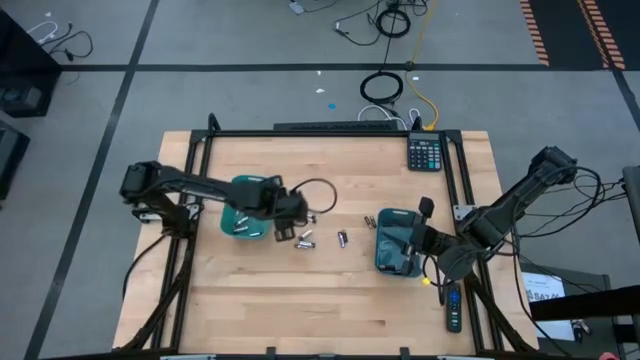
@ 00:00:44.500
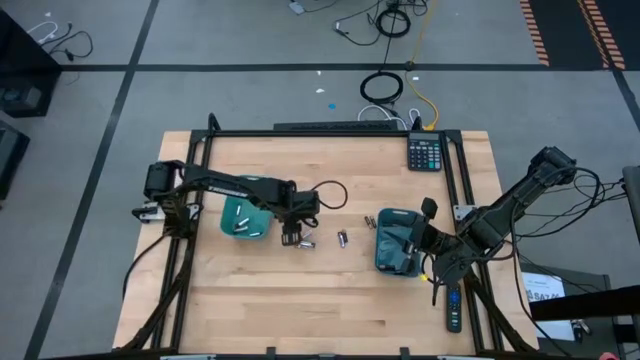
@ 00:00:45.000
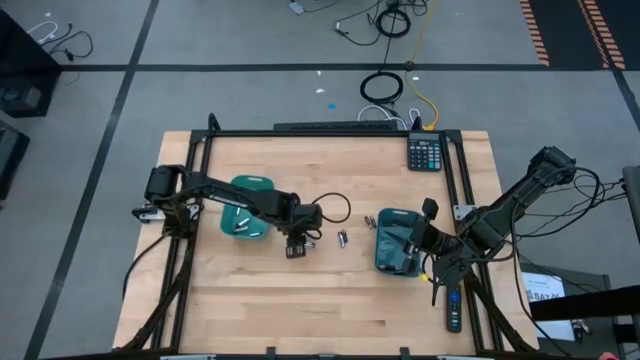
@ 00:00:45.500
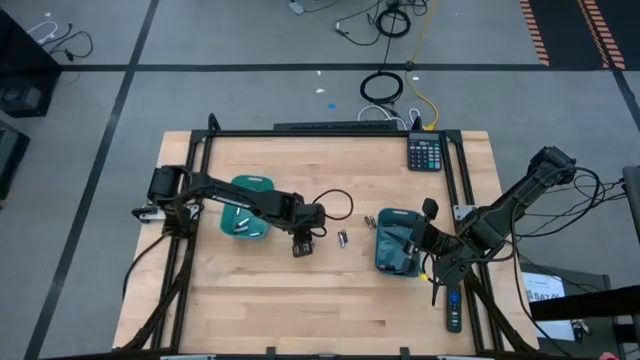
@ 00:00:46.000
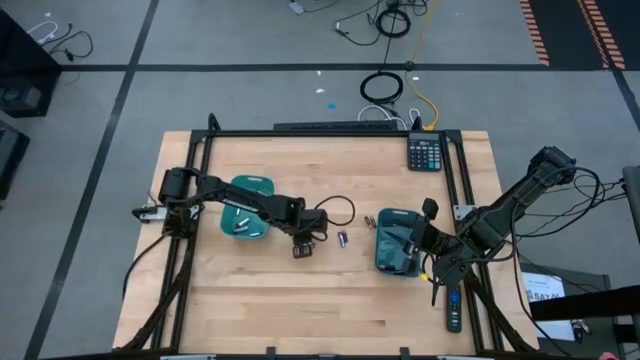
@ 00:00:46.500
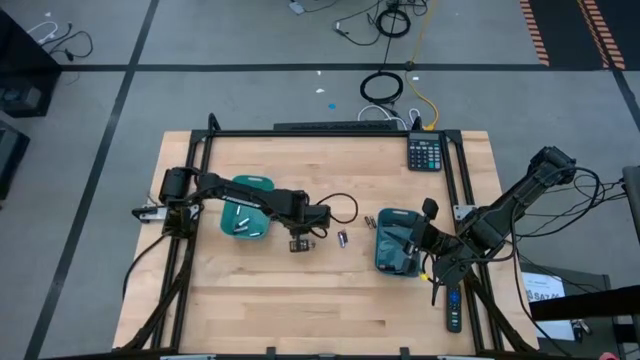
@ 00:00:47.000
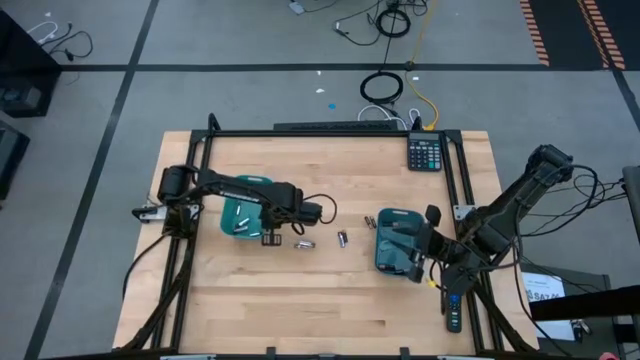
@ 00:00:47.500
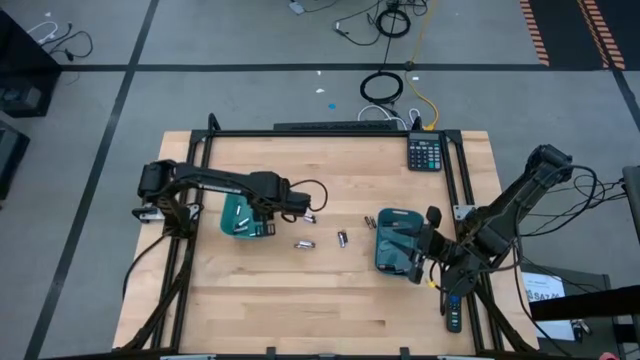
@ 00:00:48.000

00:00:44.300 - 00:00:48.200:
Task: Sort batteries
Put the silver battery into the green bin

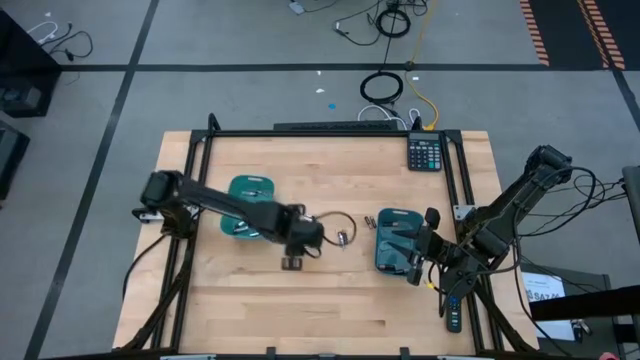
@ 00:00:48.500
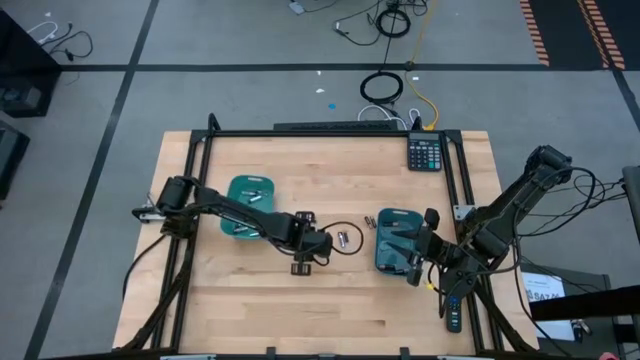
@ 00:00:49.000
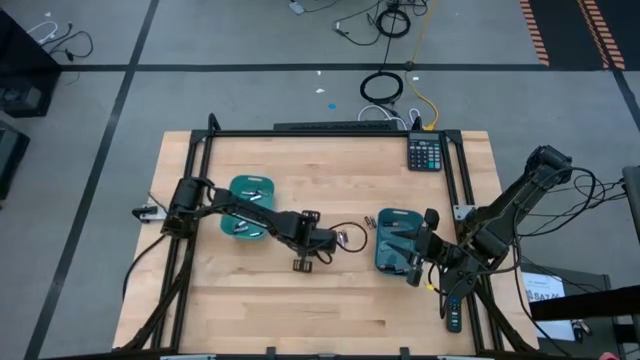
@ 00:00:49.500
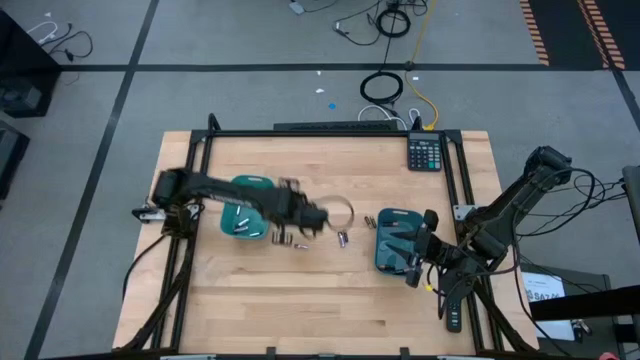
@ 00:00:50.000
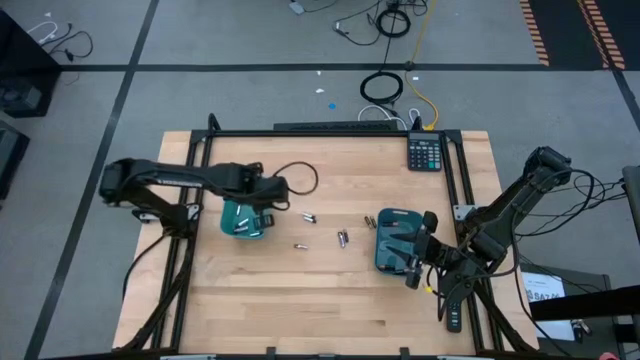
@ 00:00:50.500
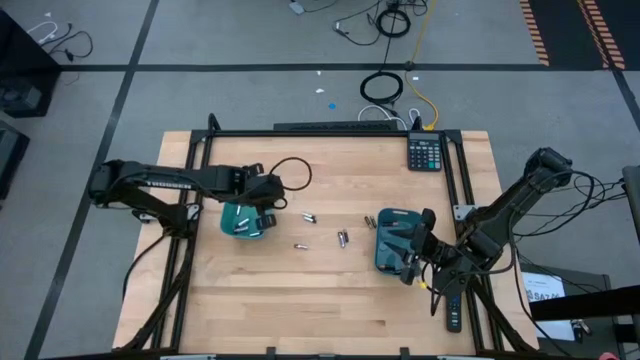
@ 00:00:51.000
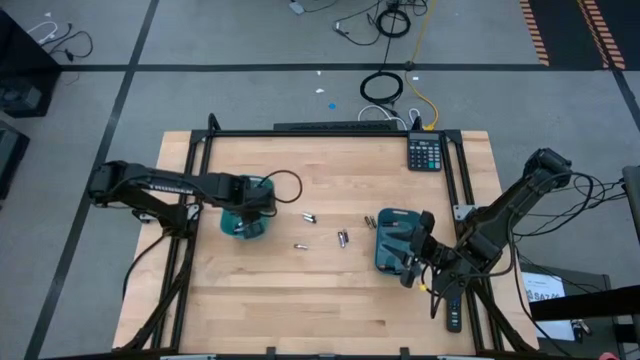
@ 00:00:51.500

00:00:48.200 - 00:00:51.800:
Put the silver battery into the green bin

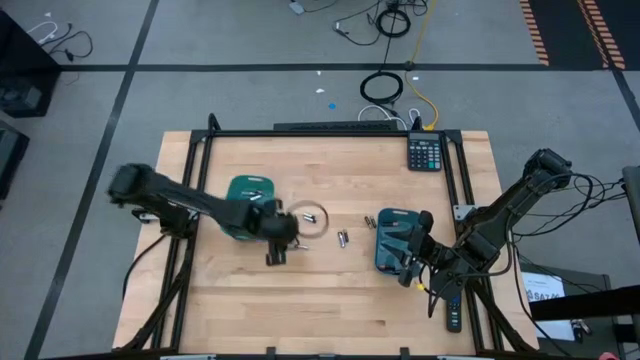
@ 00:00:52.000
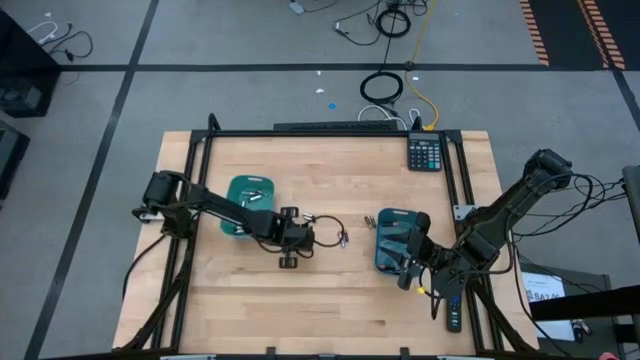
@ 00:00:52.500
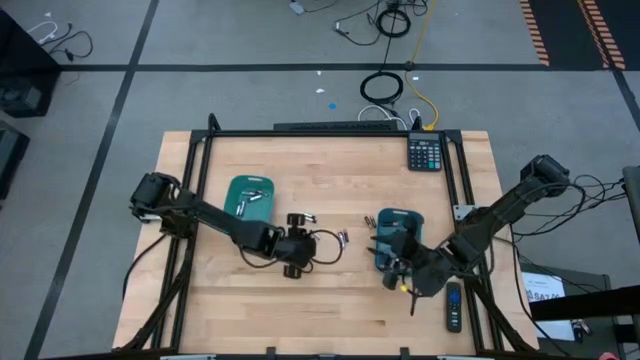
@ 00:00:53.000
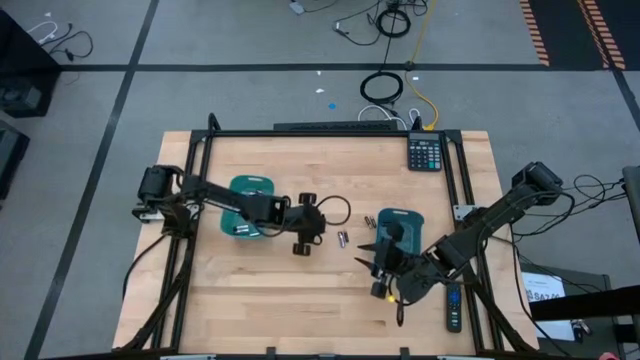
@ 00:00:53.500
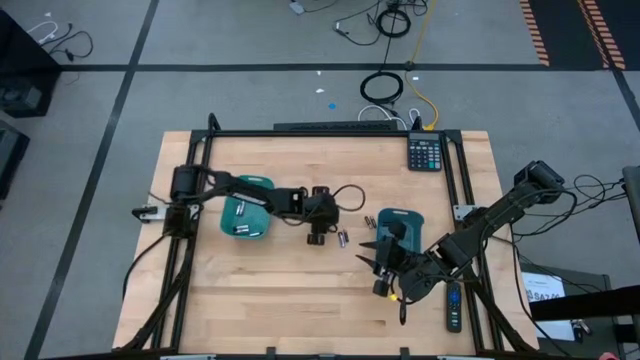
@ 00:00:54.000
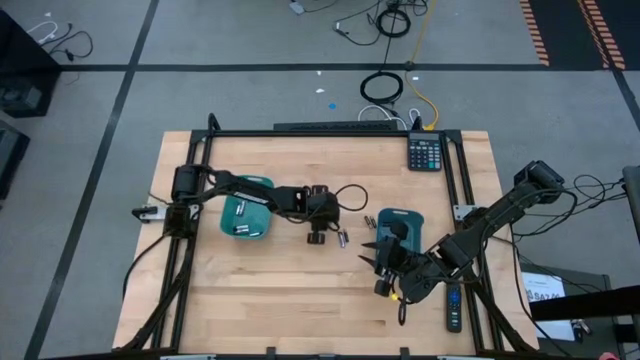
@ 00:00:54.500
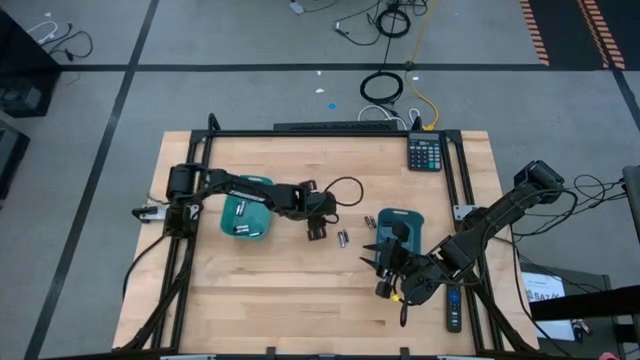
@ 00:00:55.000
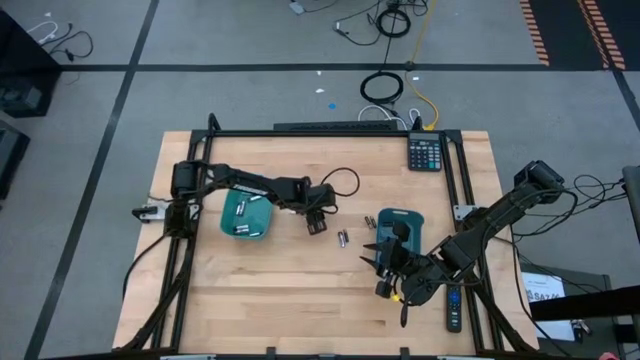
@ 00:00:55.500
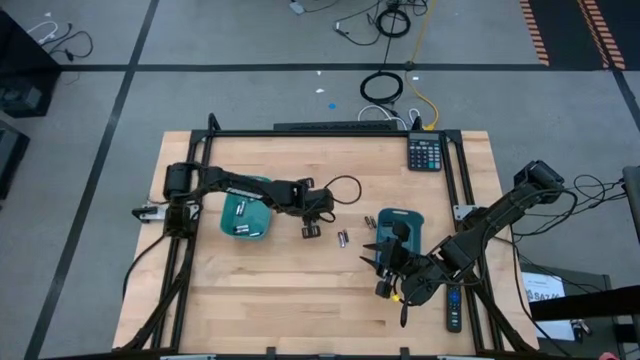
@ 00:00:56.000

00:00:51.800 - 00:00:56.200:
Put the silver battery into the green bin

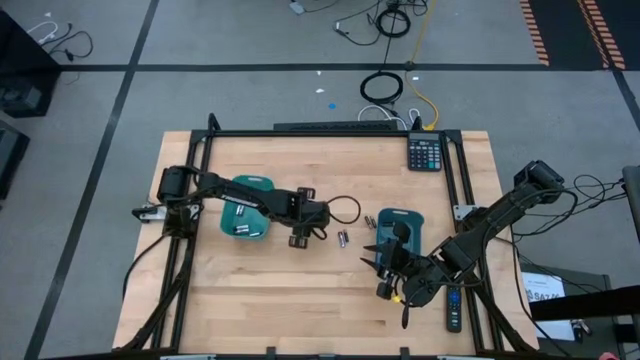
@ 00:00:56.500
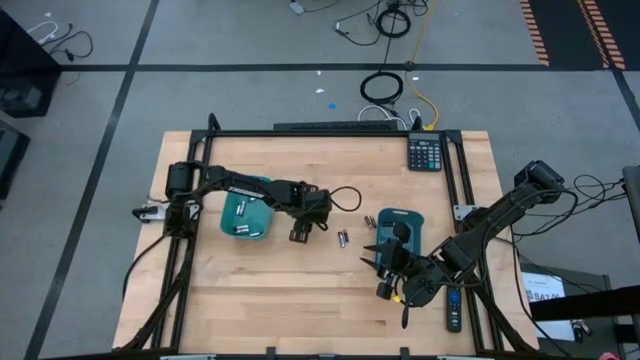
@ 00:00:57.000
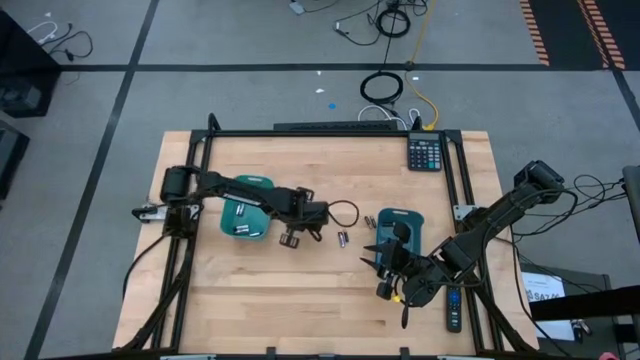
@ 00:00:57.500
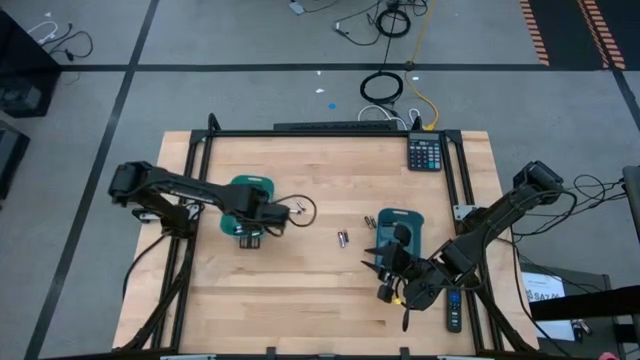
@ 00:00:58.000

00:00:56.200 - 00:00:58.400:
Put the silver battery into the green bin

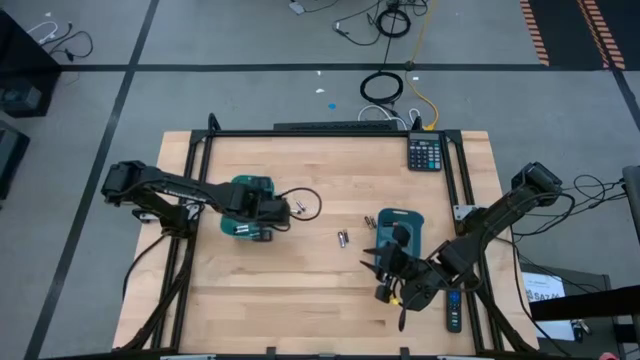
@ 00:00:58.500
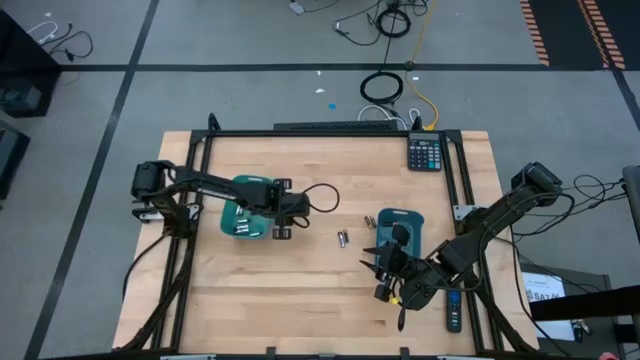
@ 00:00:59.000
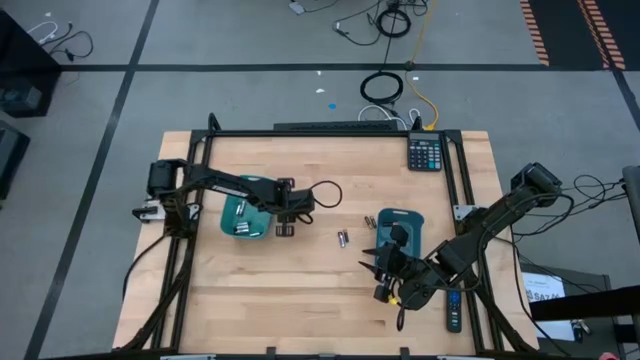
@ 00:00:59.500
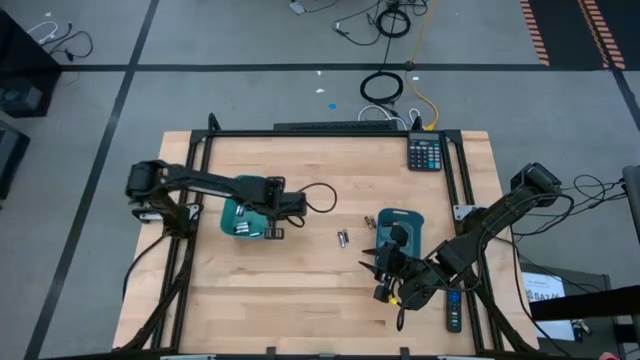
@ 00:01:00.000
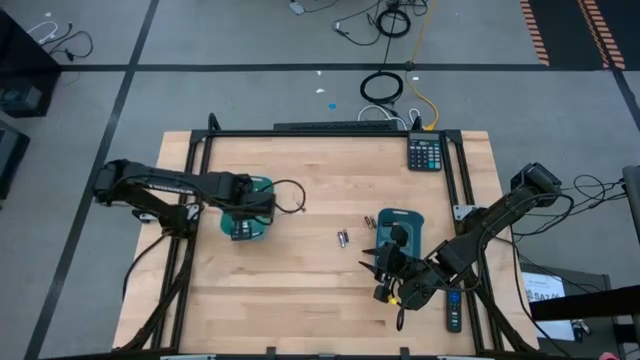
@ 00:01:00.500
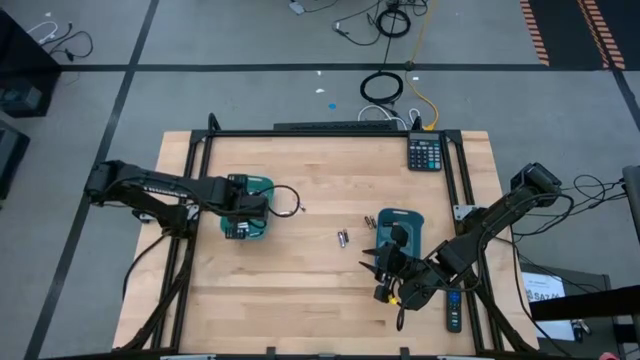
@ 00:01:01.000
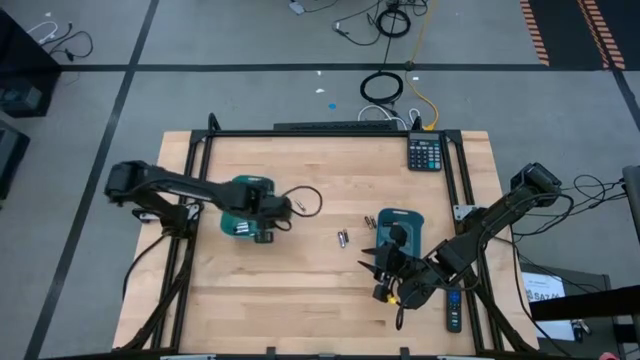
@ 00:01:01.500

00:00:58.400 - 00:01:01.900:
Put the silver battery into the green bin

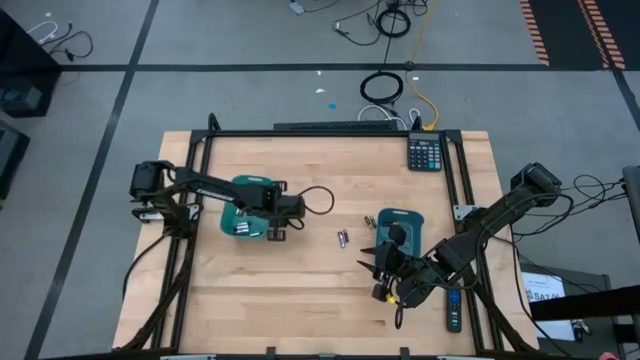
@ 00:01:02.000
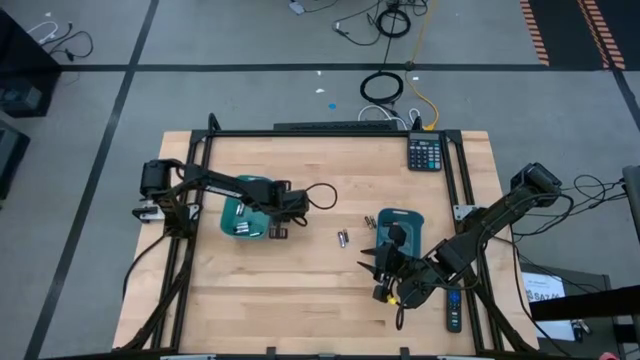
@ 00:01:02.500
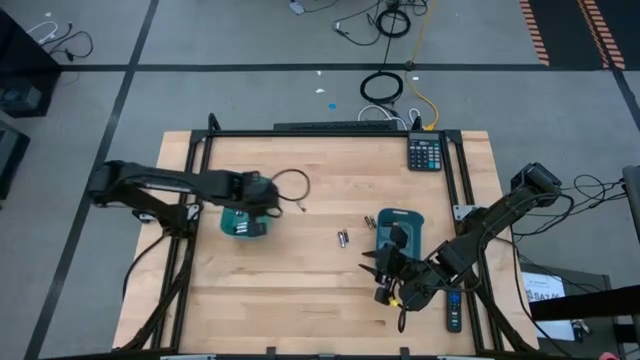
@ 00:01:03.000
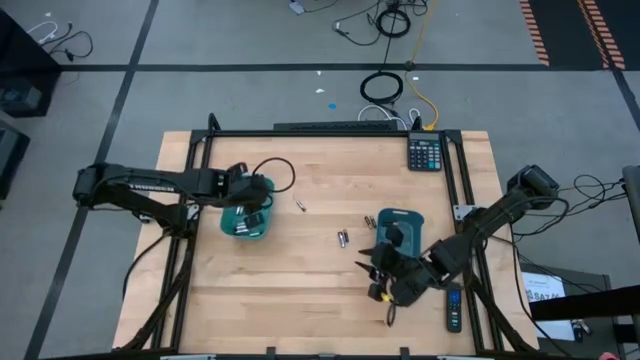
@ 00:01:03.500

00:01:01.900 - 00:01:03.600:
Put the silver battery into the green bin

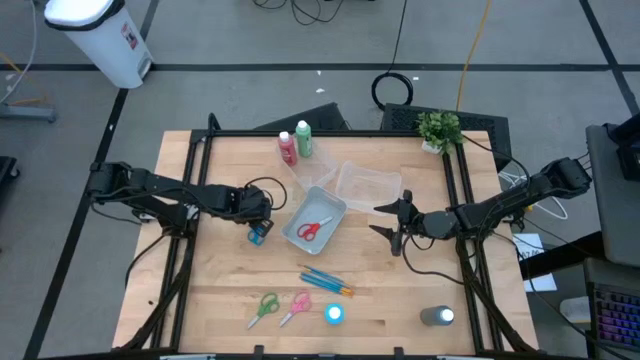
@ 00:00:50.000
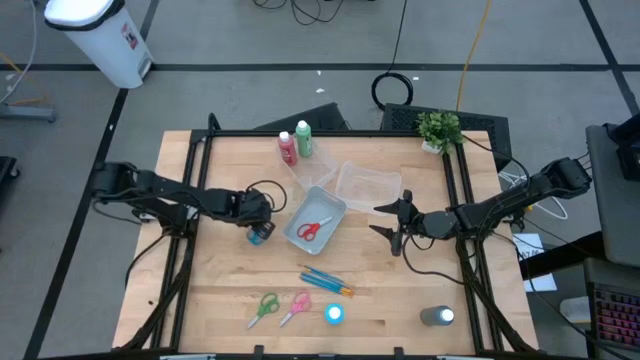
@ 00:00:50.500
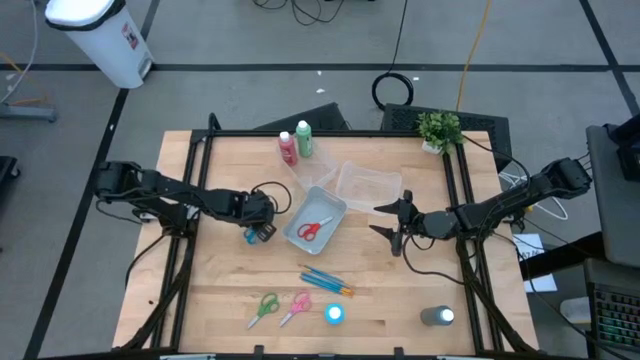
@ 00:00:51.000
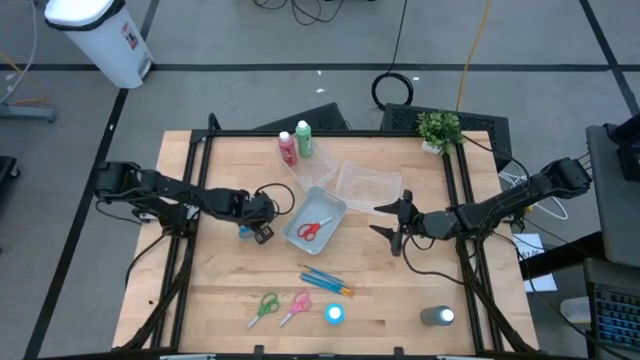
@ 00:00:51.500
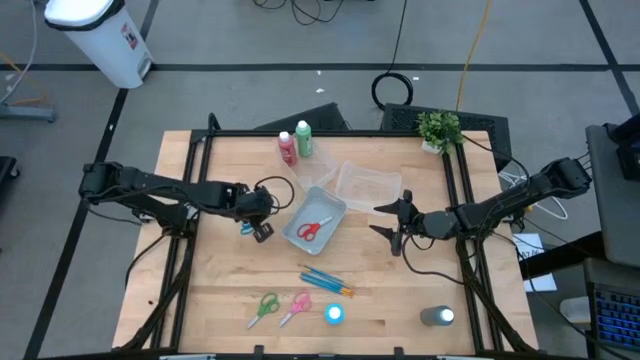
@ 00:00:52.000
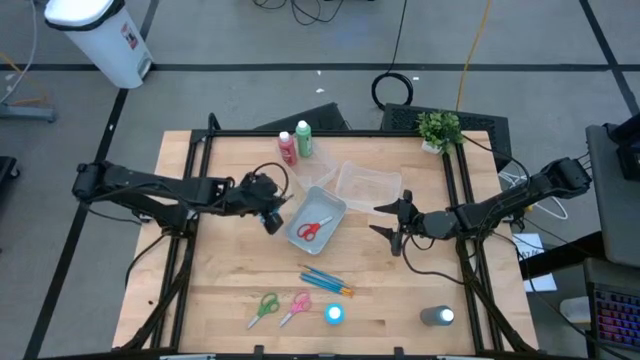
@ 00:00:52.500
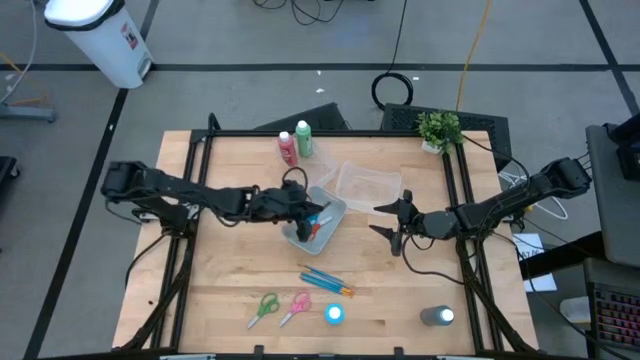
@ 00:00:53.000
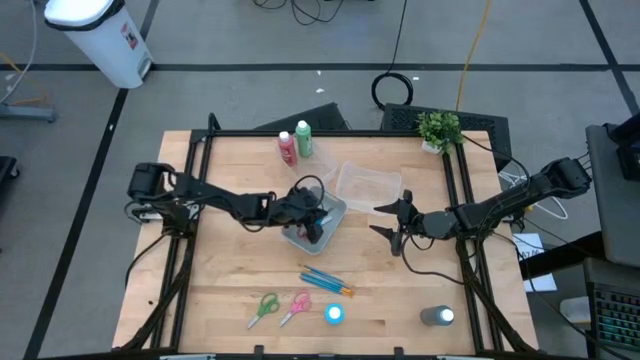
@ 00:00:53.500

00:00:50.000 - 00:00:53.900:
Task: Pick & Place Paint Supplies
Put the blue scissors into the blue bin
